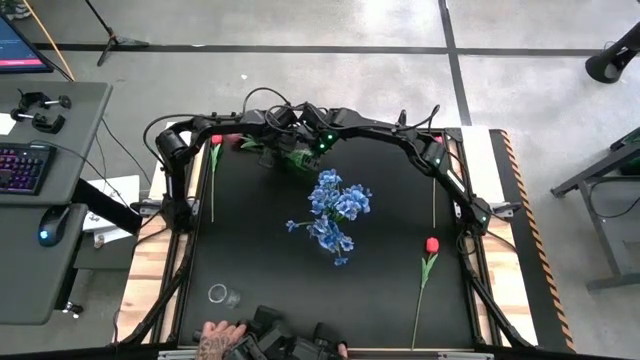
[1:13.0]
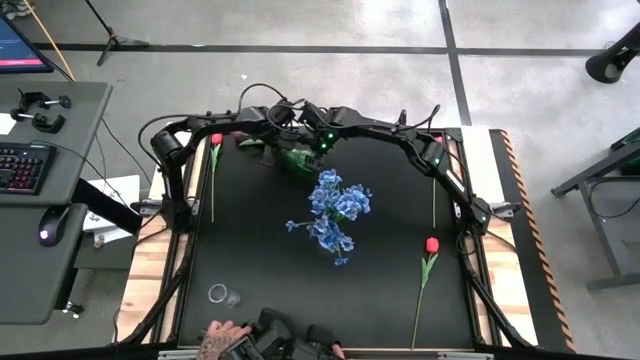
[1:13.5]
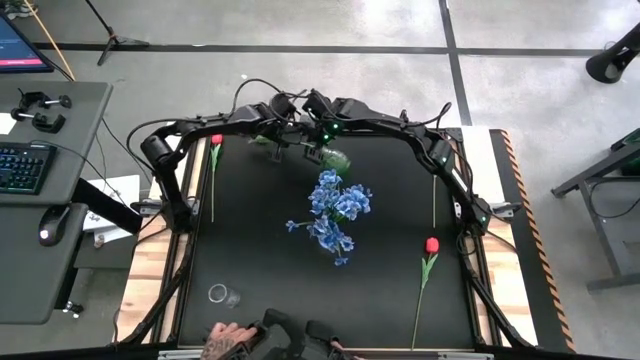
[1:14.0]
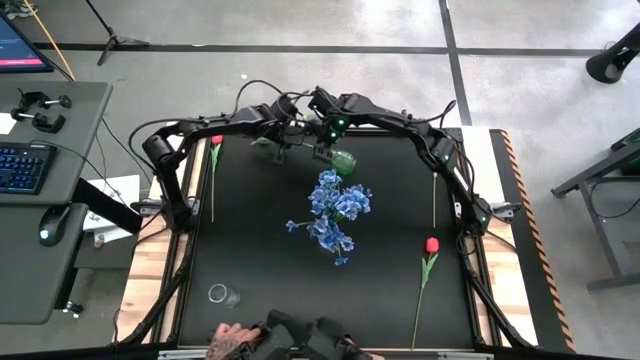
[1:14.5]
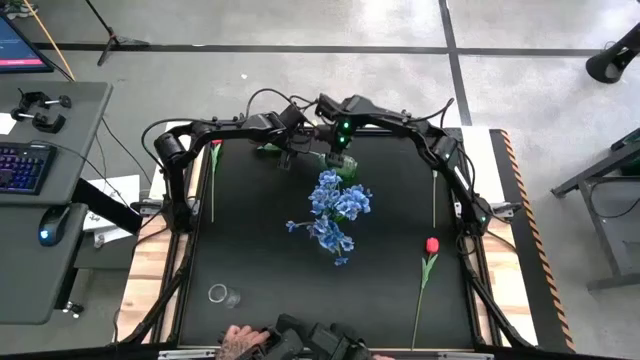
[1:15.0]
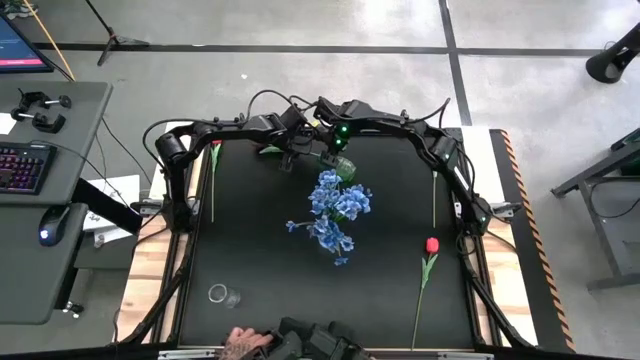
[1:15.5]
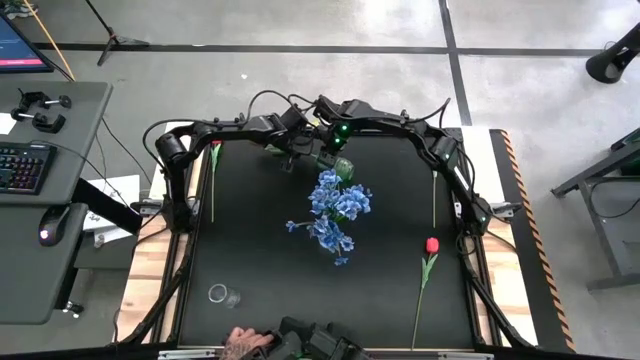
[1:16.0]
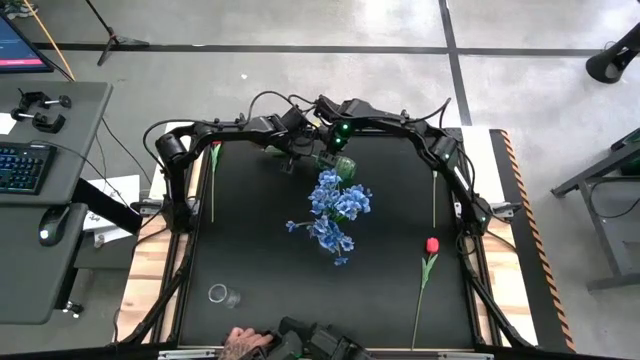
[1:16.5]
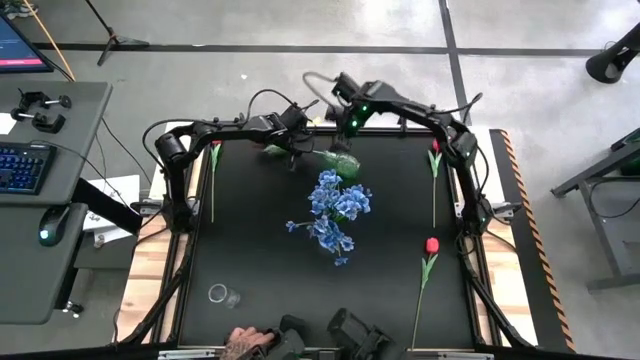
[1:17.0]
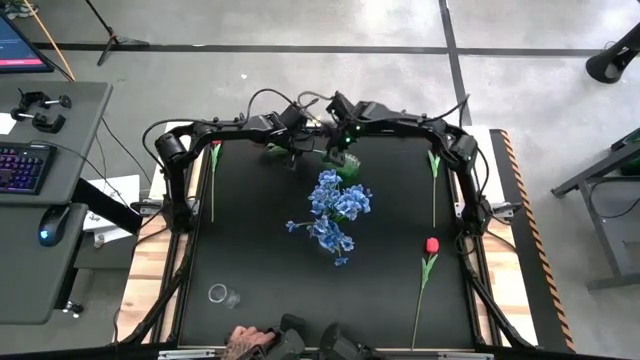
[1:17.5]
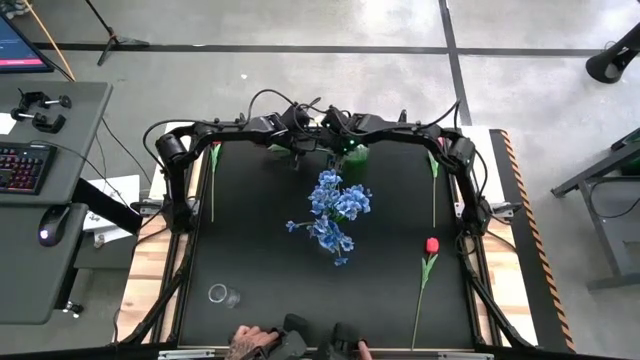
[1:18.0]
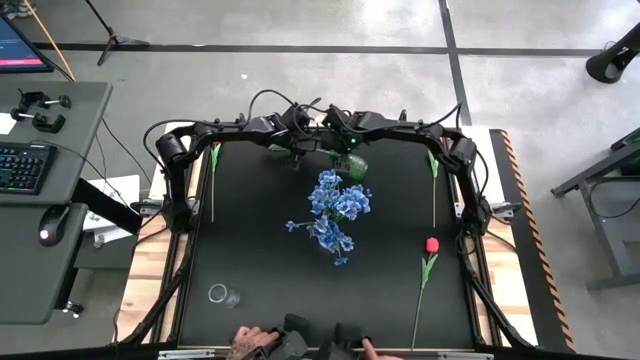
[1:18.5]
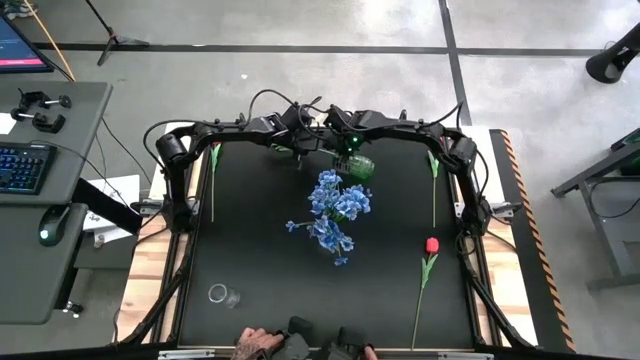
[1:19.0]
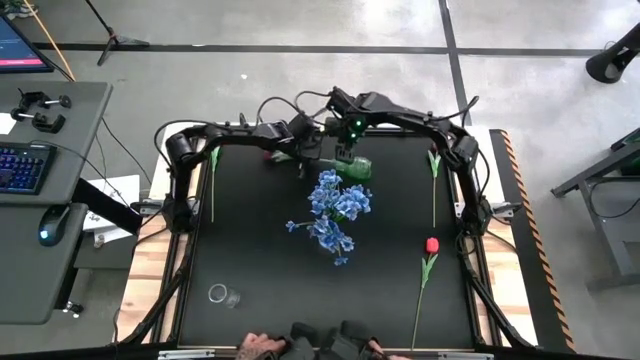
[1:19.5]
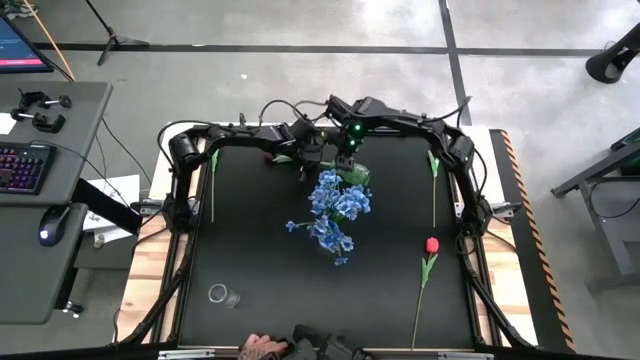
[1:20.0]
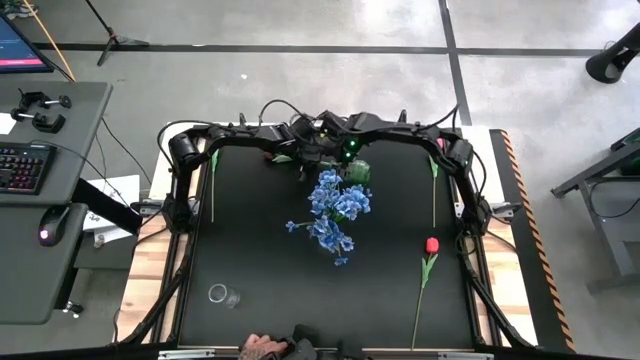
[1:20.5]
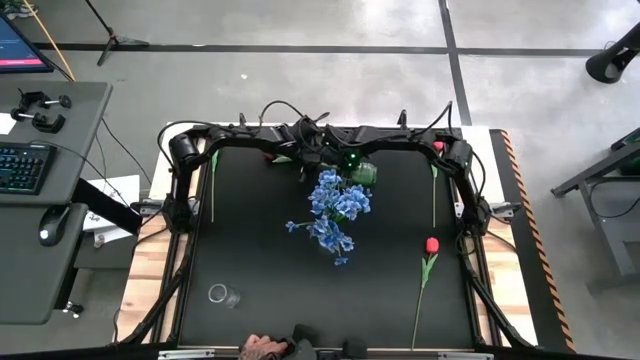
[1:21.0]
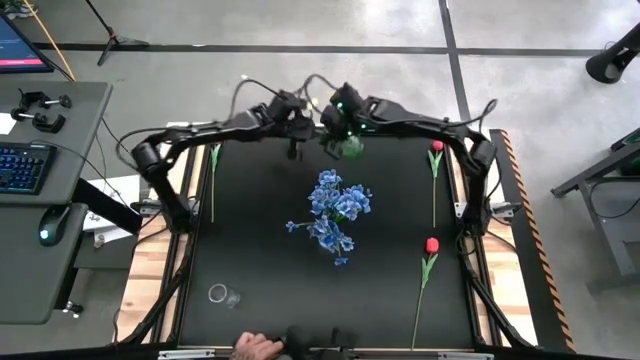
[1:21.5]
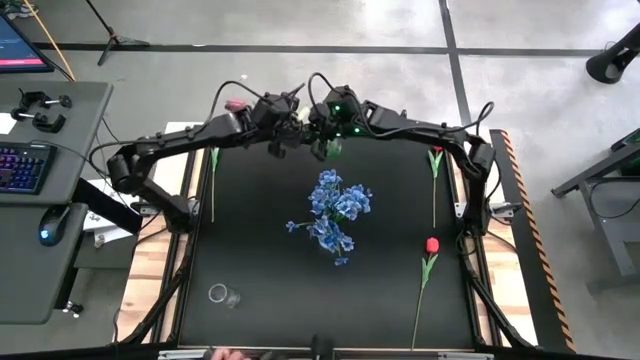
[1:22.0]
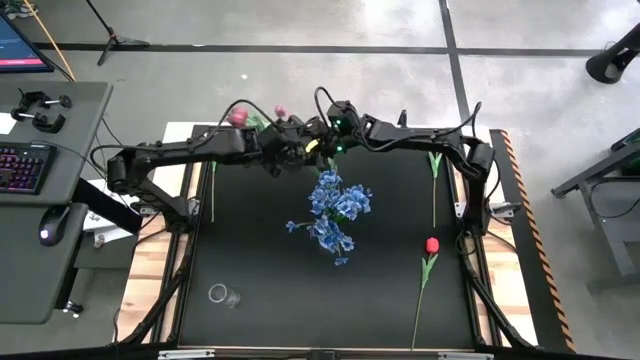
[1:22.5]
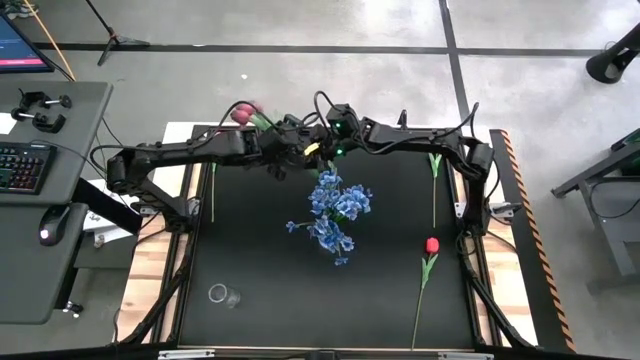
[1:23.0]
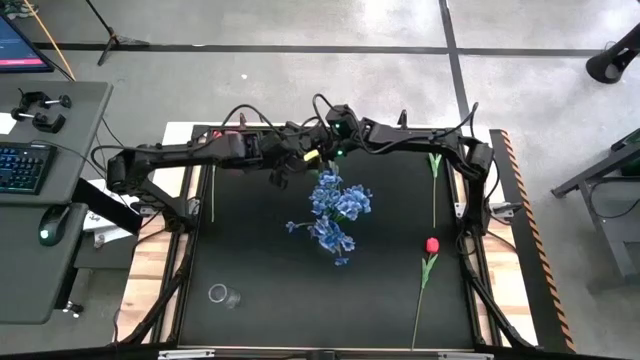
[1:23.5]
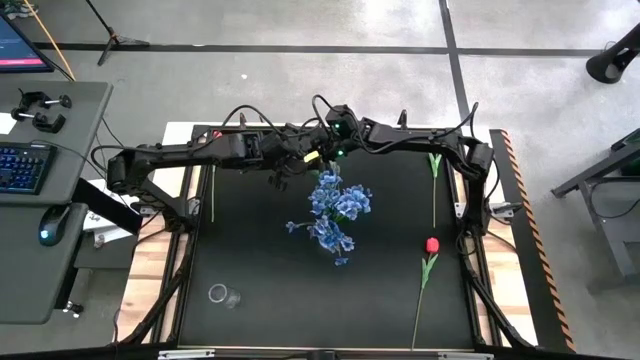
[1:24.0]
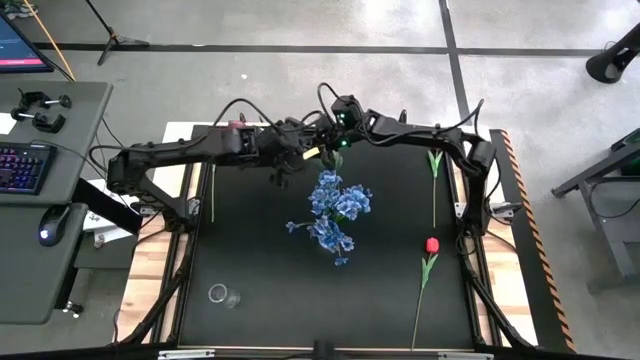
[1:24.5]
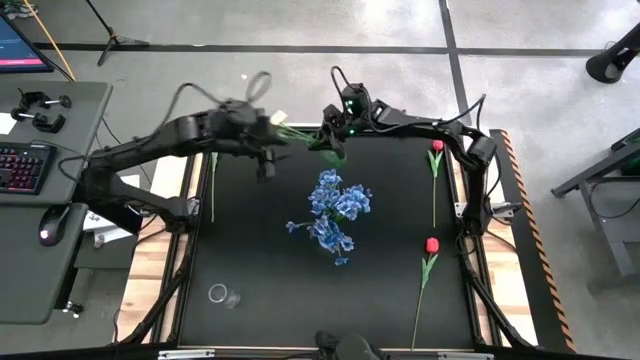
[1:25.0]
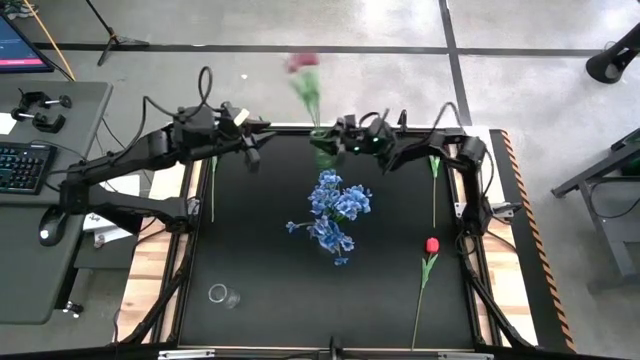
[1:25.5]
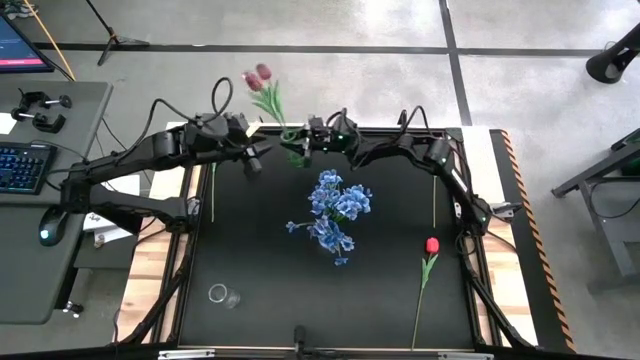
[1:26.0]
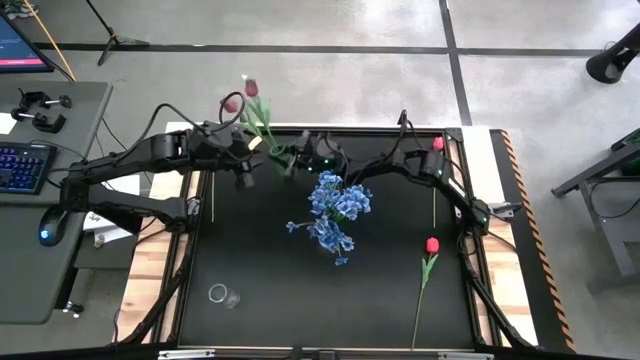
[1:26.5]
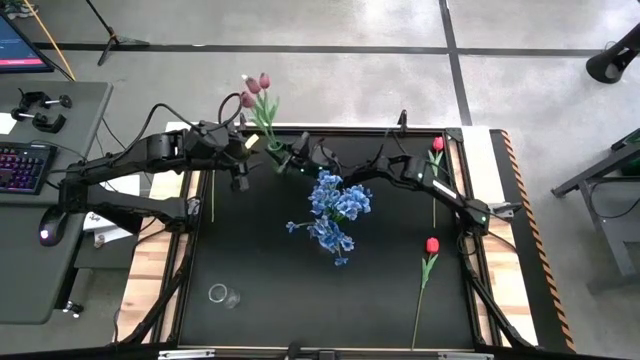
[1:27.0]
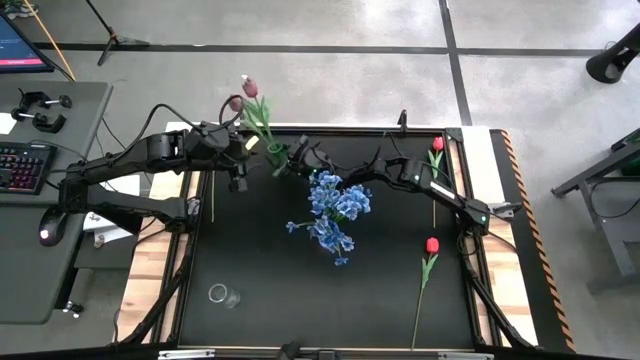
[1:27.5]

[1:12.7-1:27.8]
Task: Sort flowers into vase by color
Adjust the green vase on the table

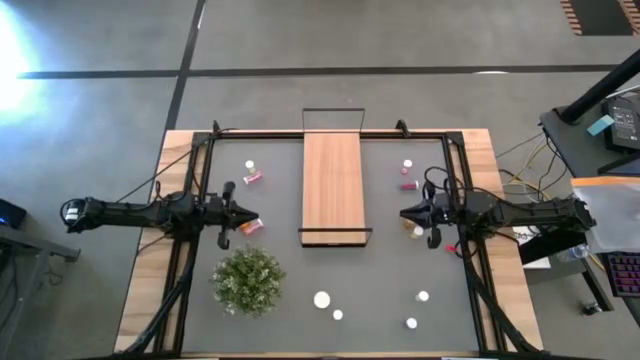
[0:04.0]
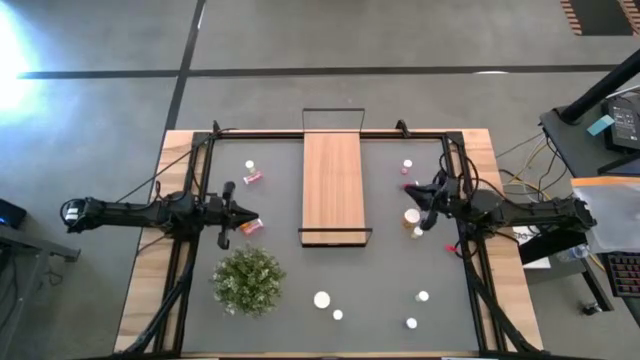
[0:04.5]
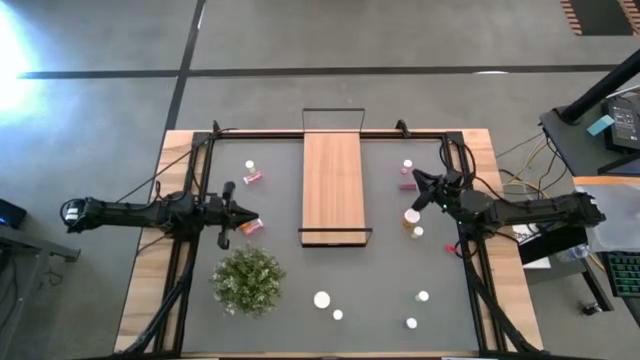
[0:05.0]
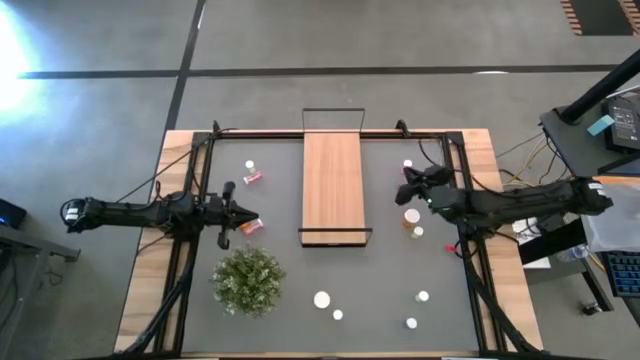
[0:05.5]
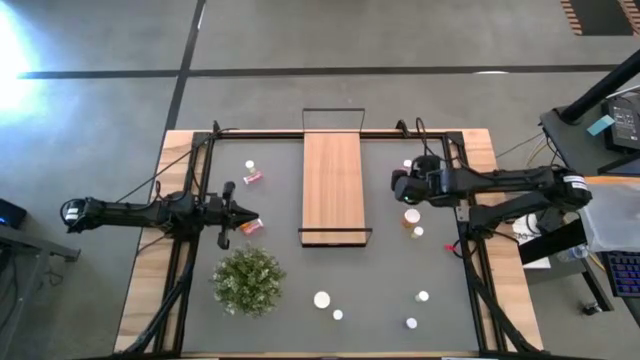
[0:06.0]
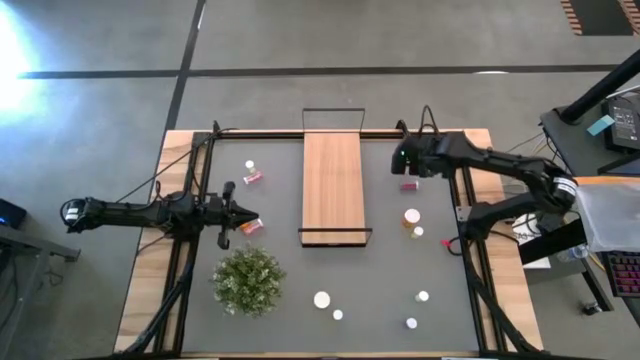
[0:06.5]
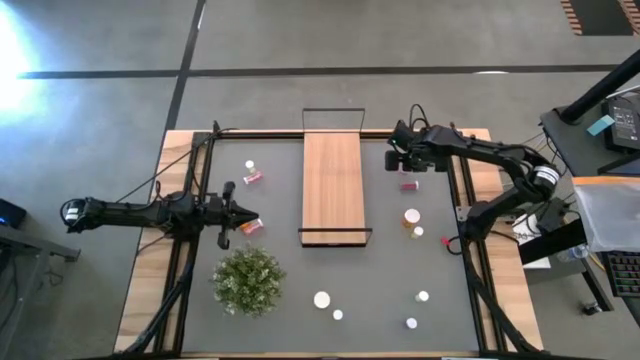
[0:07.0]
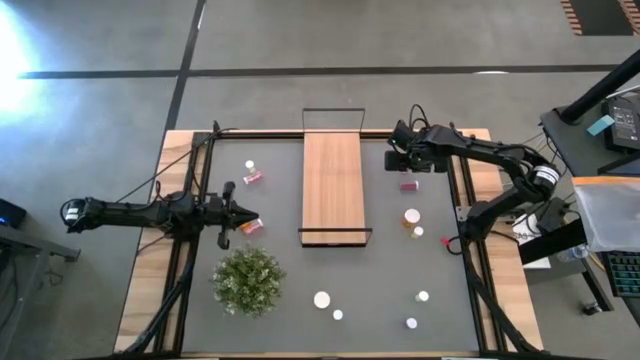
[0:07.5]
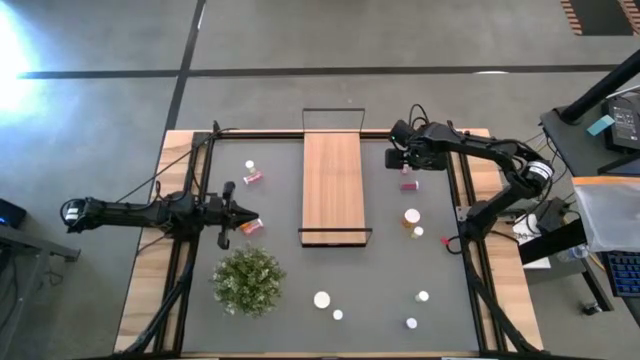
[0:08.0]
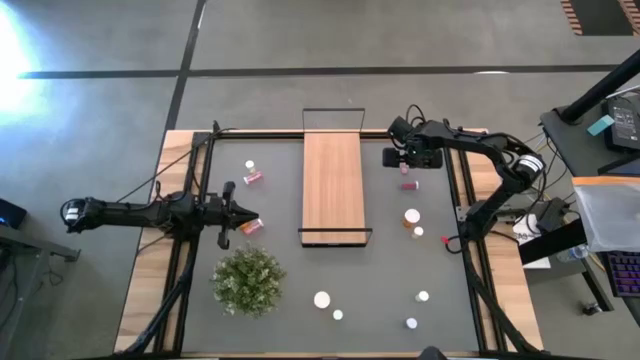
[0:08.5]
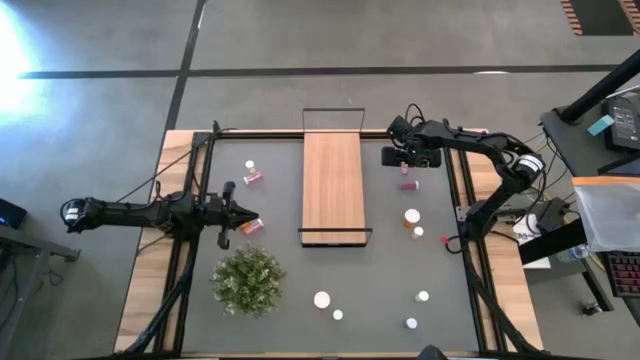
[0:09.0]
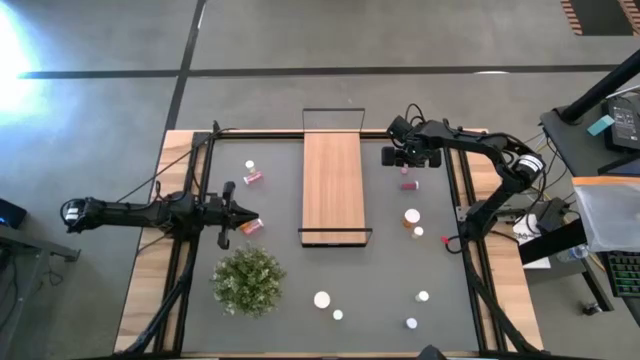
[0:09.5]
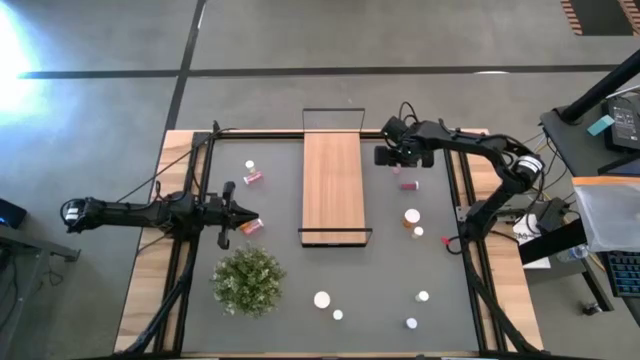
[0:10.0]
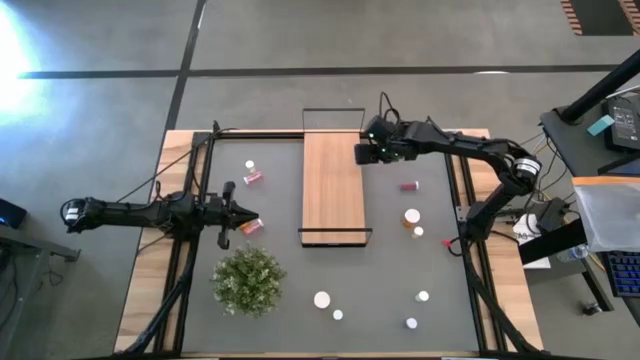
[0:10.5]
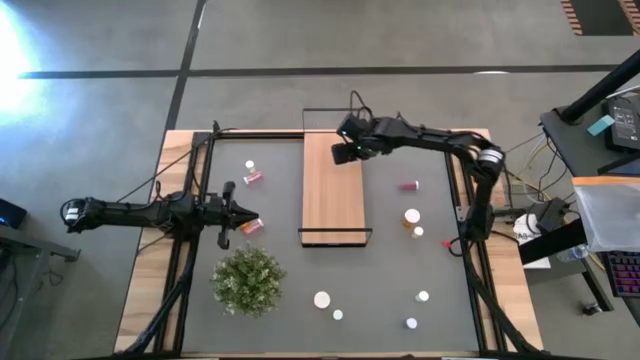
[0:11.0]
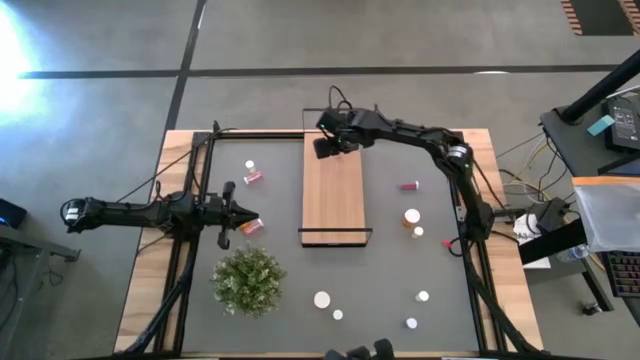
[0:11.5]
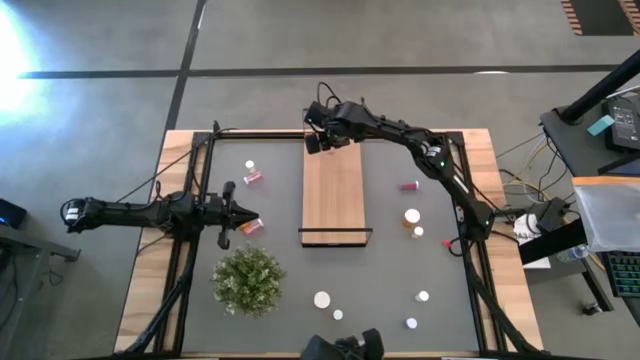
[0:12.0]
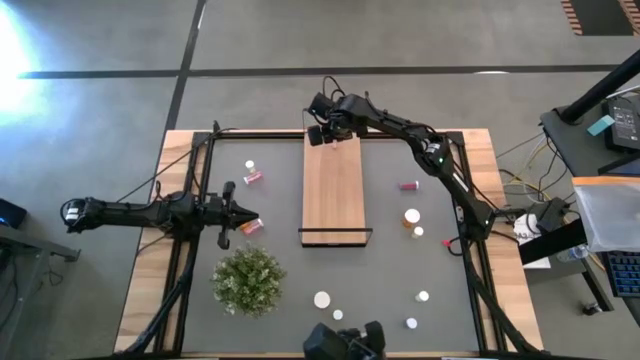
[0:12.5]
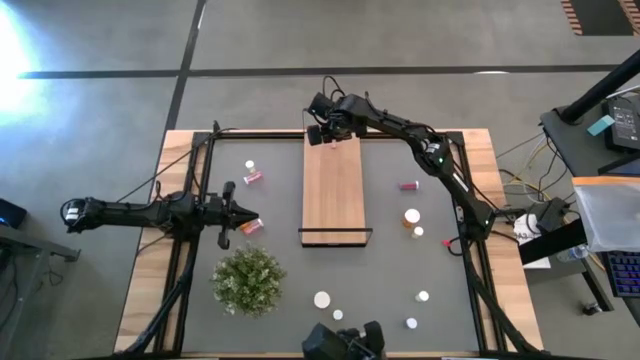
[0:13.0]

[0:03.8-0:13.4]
Task: Pick and place medicine bottles onto shelf by color
Put the top right pink pill bottle on the shelf
